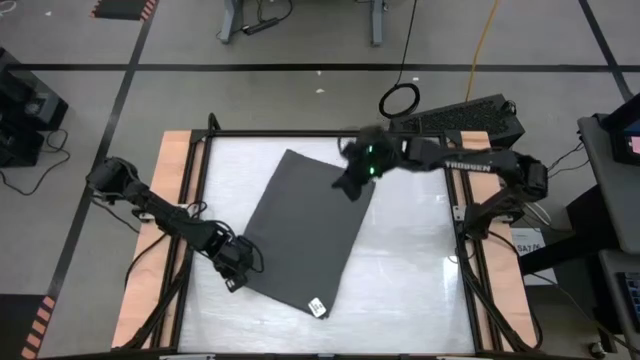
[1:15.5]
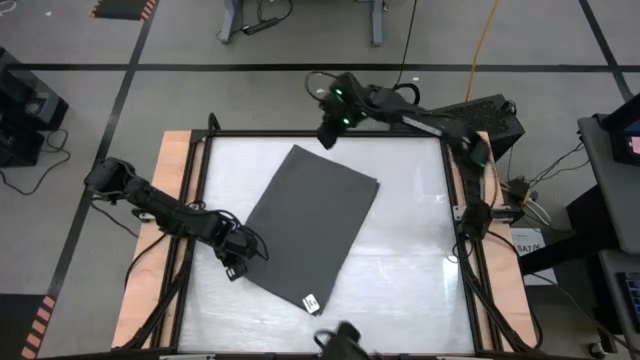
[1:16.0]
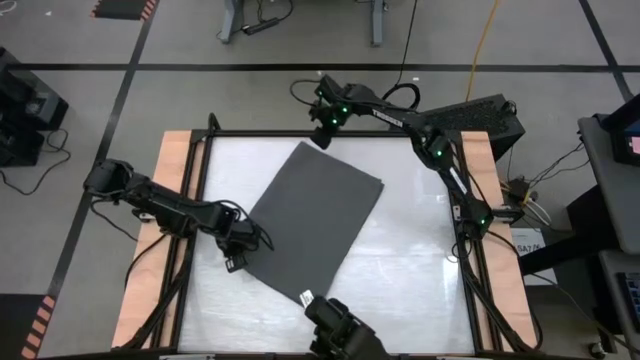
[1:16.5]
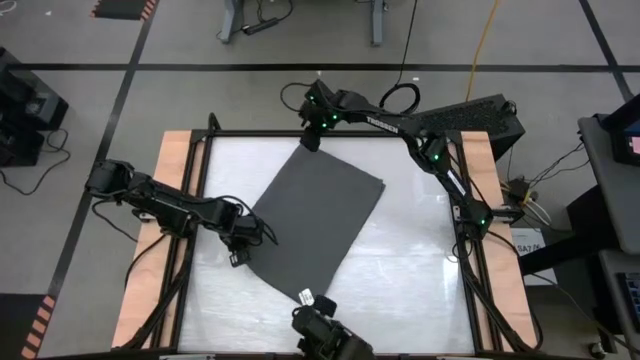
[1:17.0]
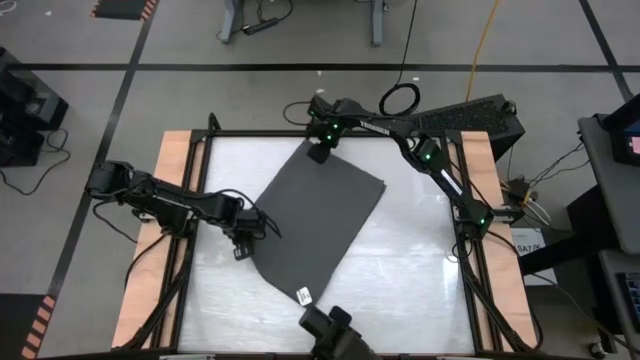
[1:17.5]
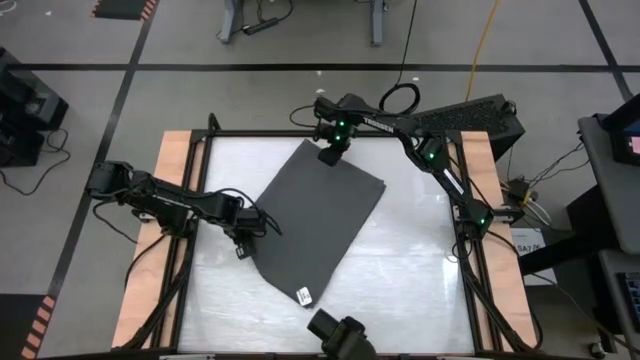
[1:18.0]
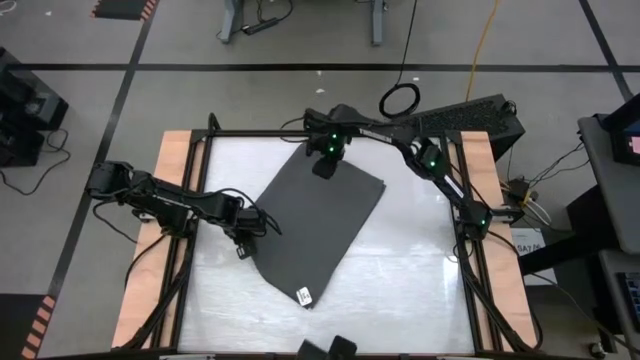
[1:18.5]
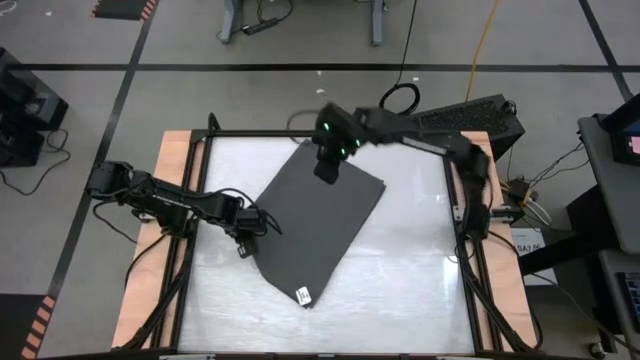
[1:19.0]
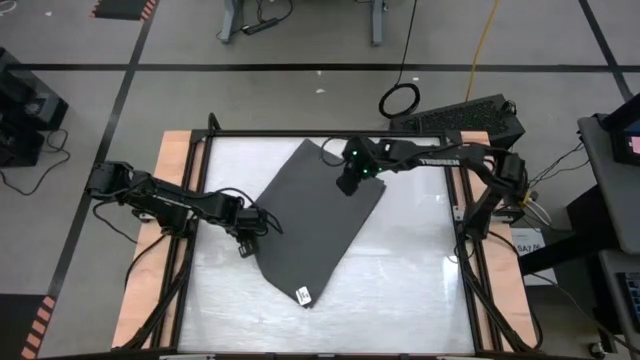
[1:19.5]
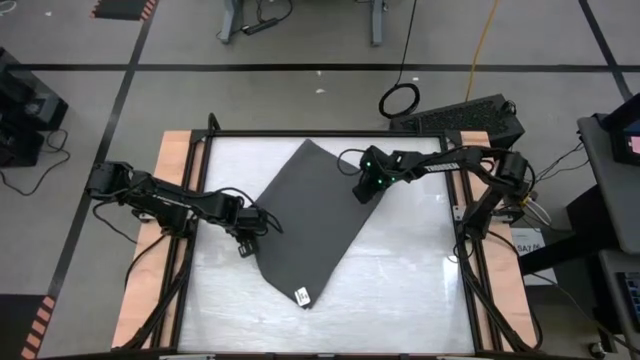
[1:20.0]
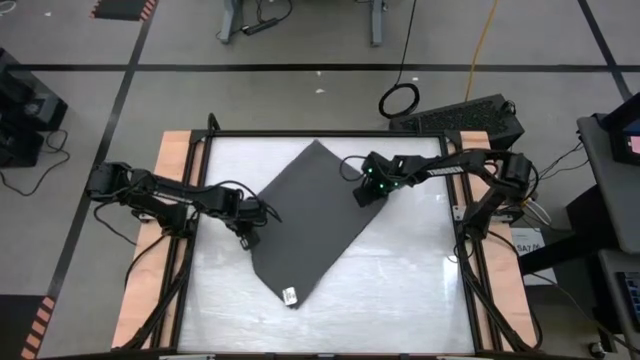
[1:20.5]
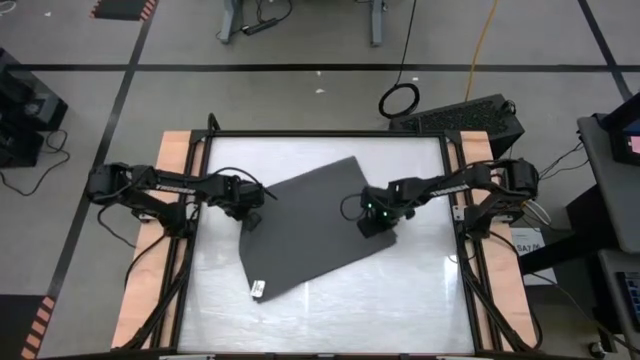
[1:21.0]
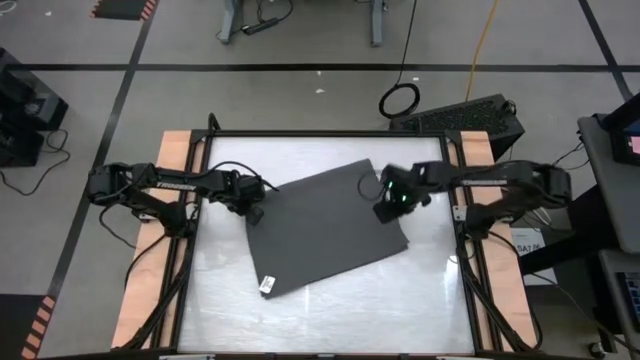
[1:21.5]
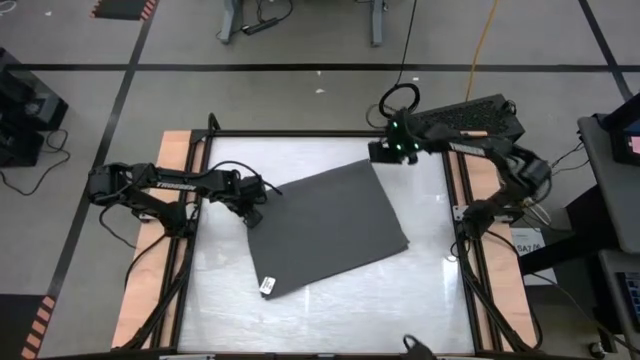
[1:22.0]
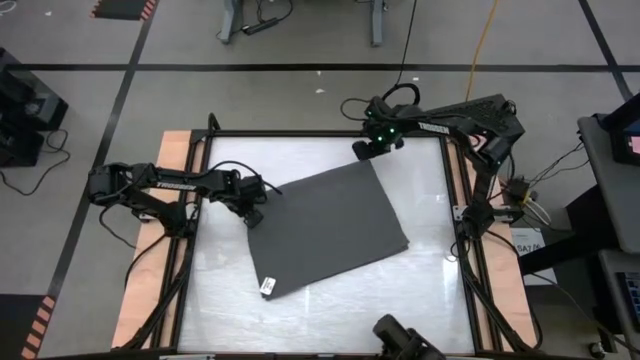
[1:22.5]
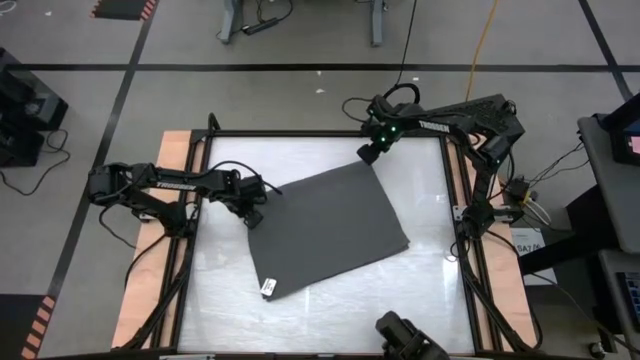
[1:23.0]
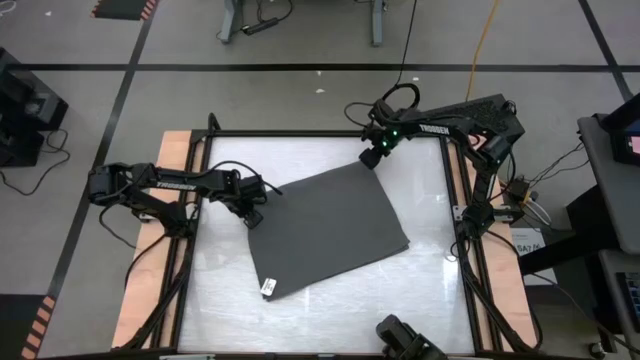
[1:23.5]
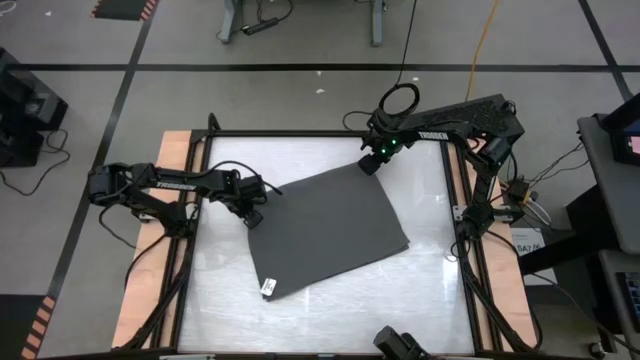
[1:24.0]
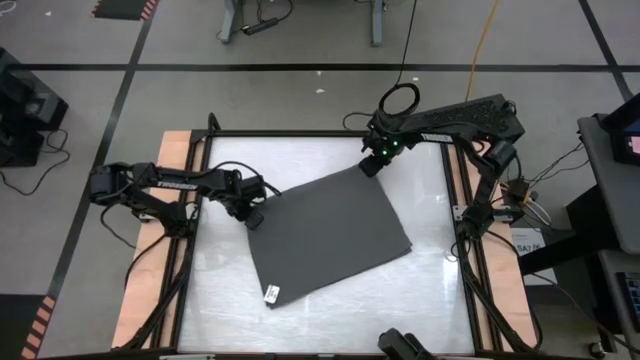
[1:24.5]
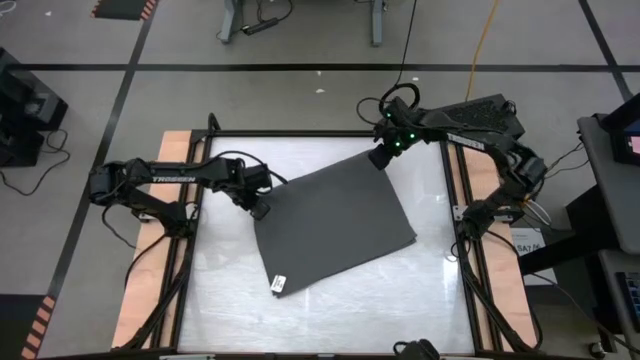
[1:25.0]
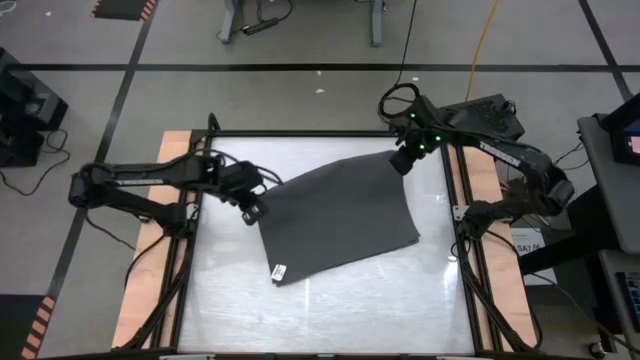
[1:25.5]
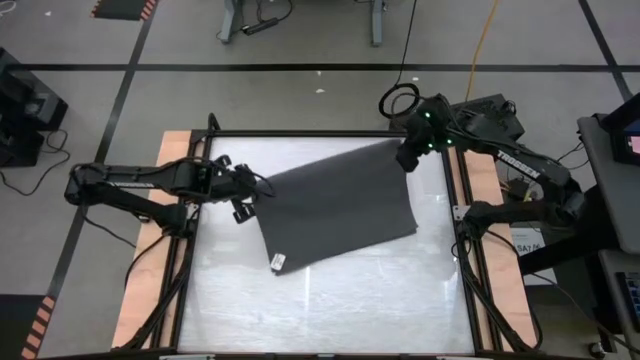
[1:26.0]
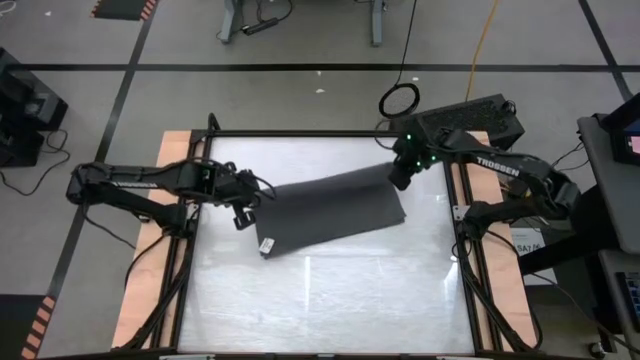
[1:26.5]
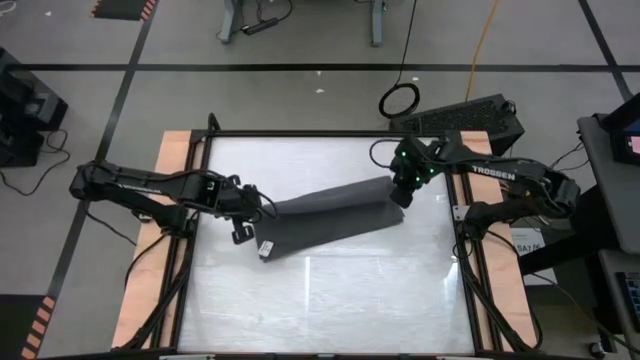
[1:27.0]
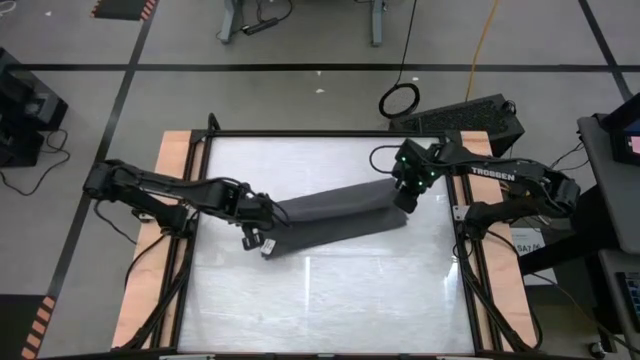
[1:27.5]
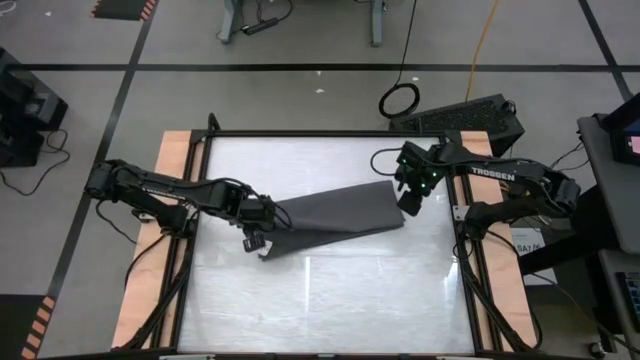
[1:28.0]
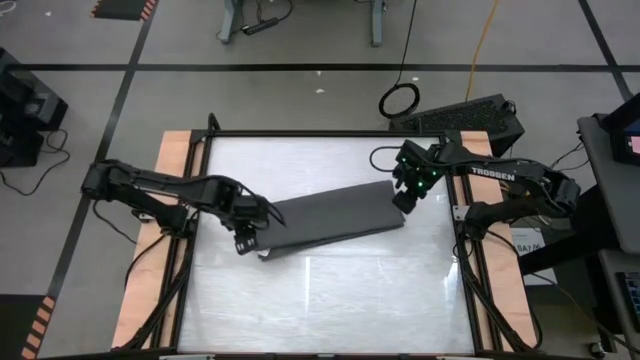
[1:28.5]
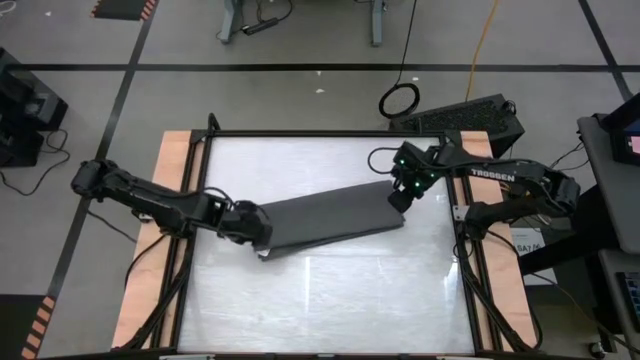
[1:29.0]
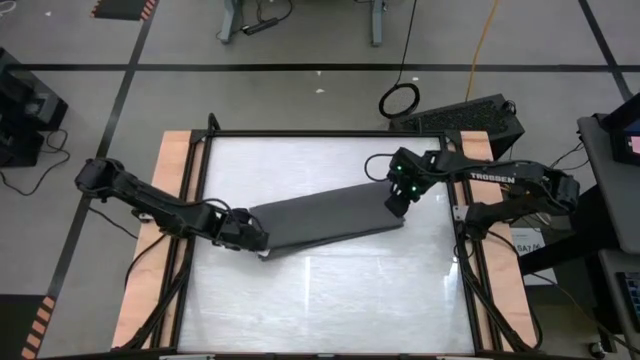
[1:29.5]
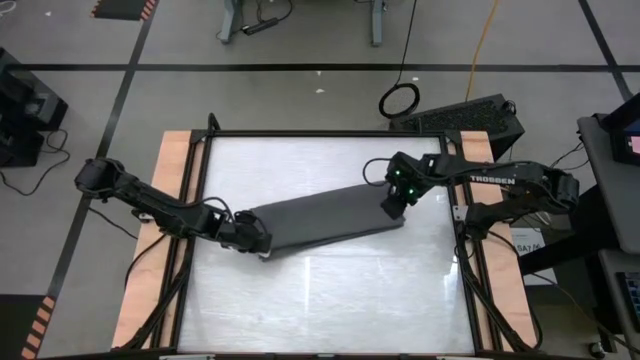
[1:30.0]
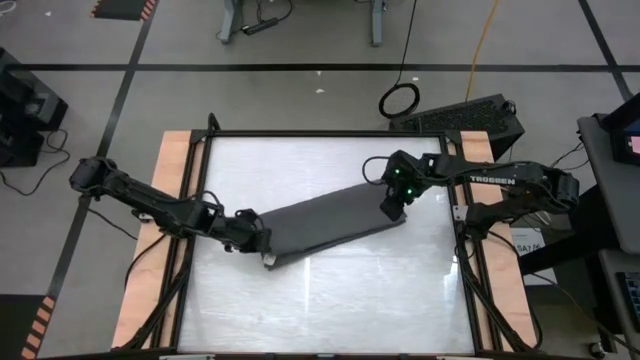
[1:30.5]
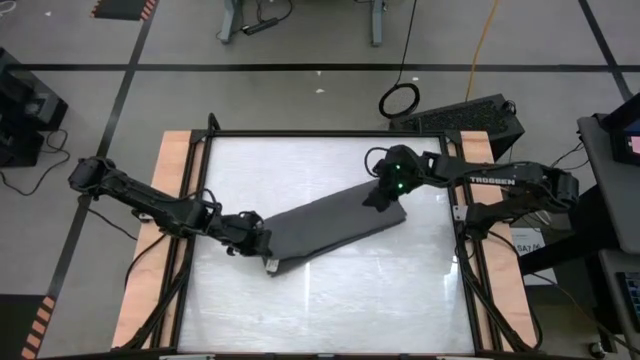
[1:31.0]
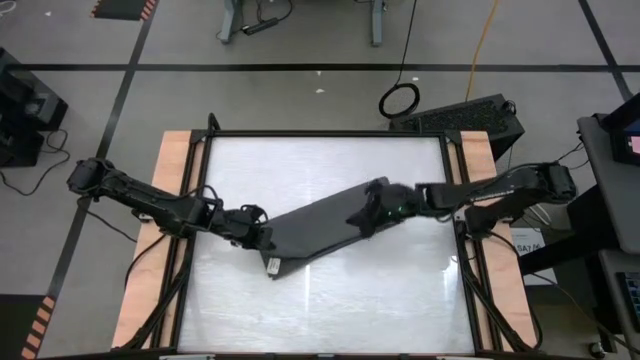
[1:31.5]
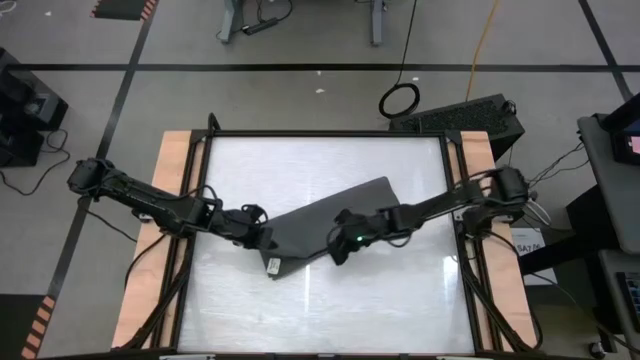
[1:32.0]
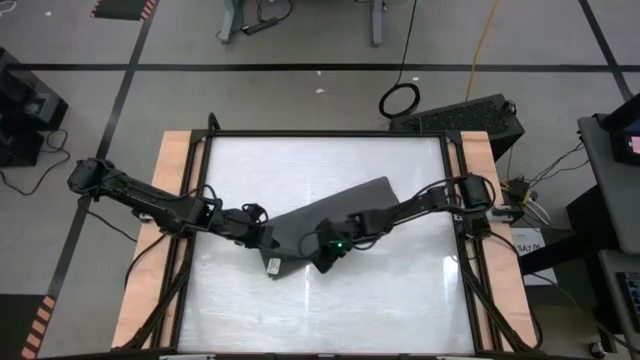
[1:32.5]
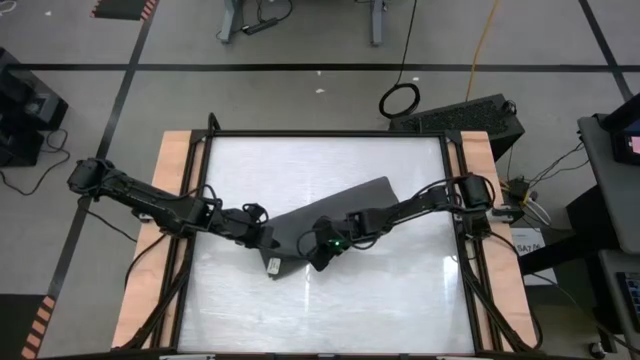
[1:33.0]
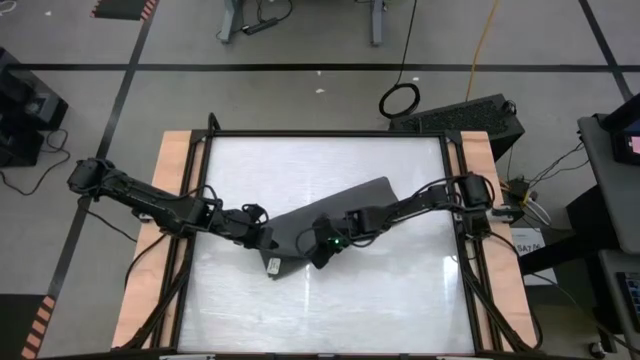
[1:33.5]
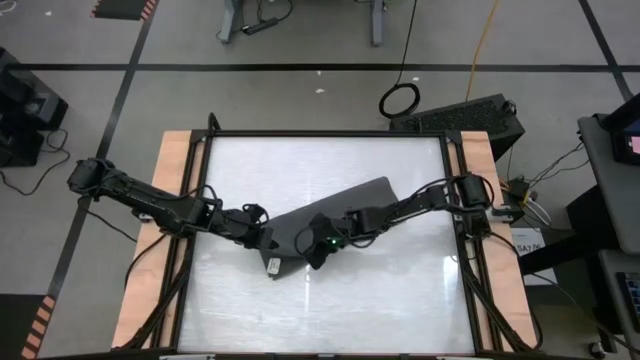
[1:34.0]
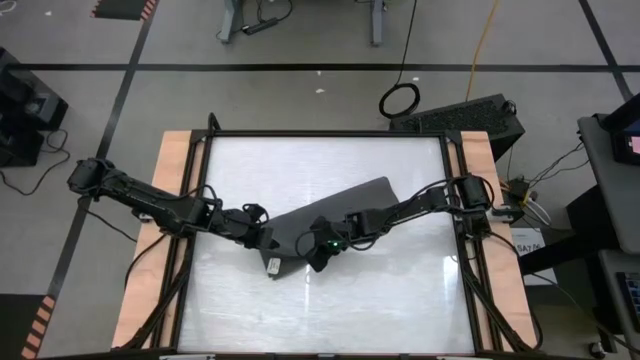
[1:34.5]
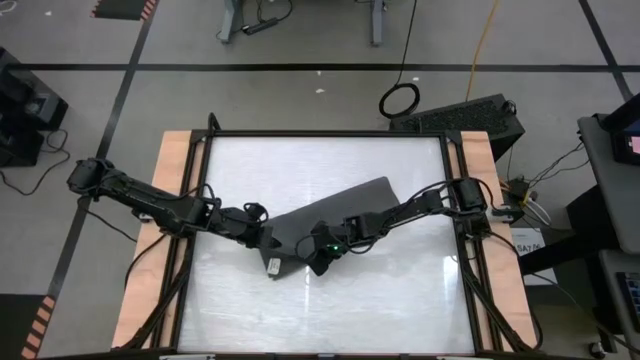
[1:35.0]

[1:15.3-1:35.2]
Task: Roll towel into tight, uniform cylinder
Roll the gray towel
